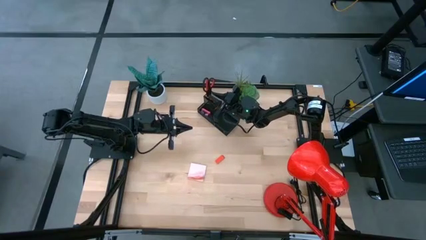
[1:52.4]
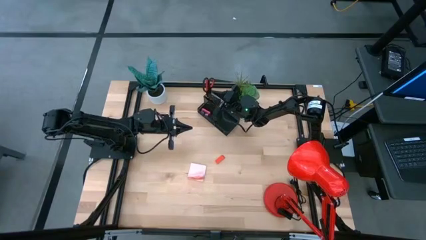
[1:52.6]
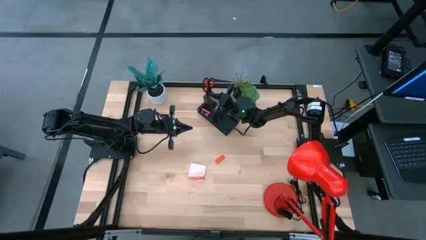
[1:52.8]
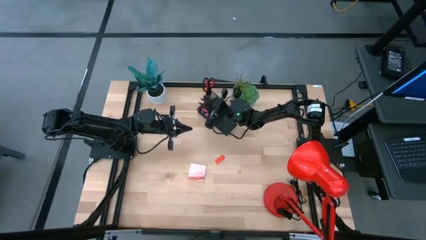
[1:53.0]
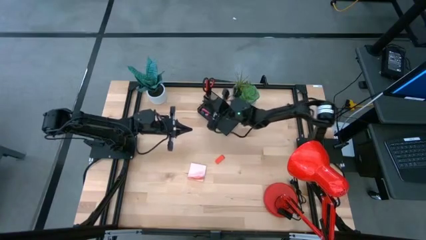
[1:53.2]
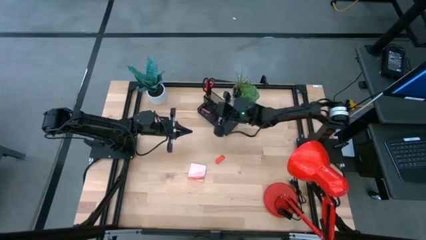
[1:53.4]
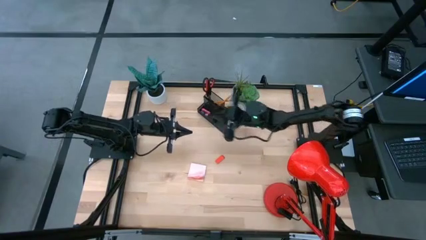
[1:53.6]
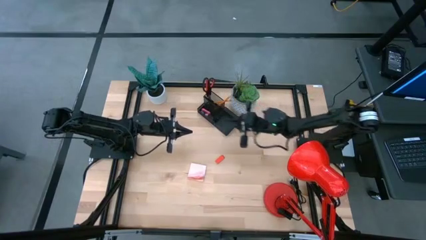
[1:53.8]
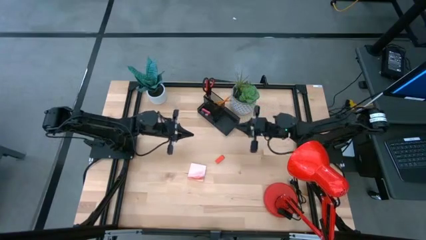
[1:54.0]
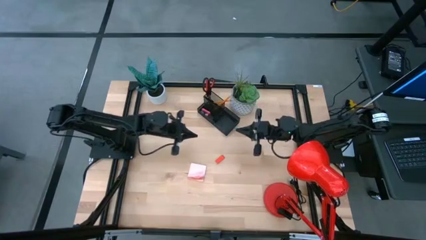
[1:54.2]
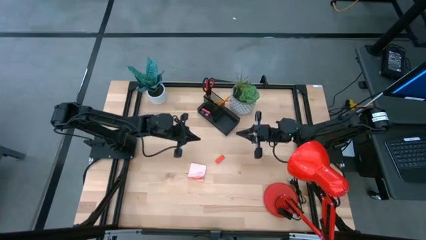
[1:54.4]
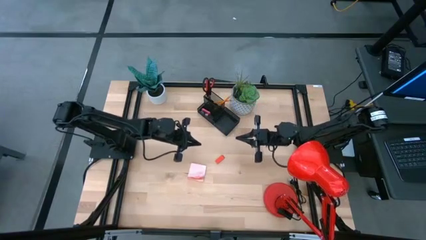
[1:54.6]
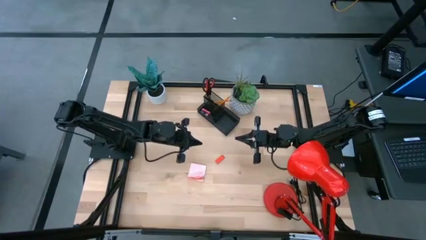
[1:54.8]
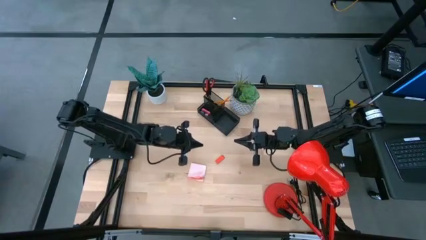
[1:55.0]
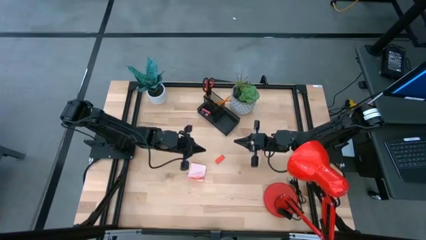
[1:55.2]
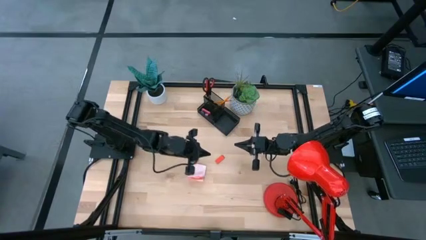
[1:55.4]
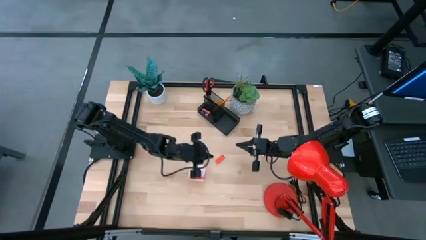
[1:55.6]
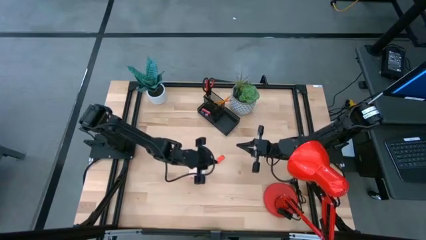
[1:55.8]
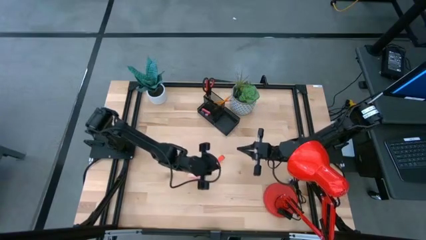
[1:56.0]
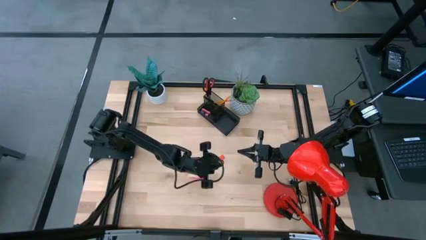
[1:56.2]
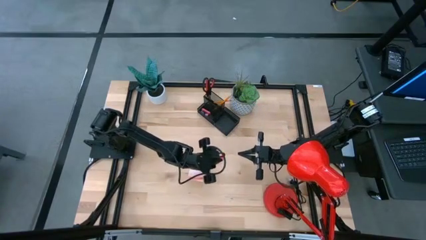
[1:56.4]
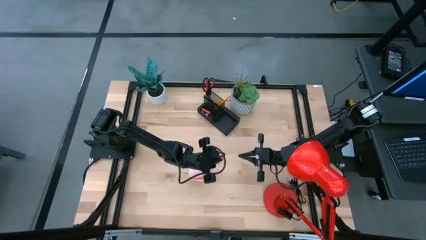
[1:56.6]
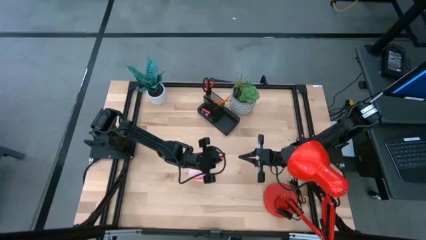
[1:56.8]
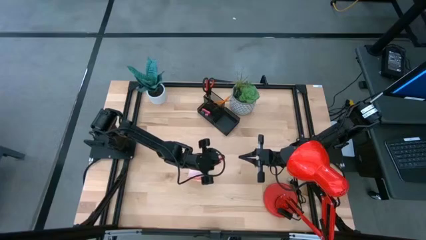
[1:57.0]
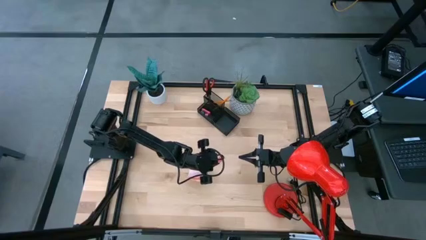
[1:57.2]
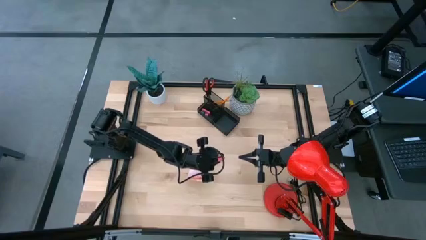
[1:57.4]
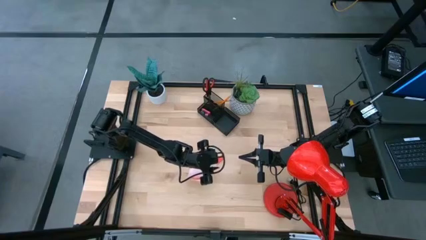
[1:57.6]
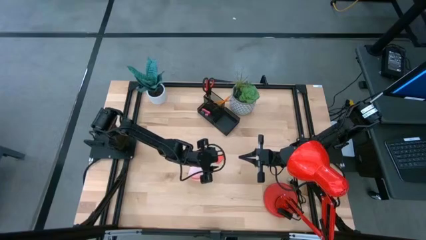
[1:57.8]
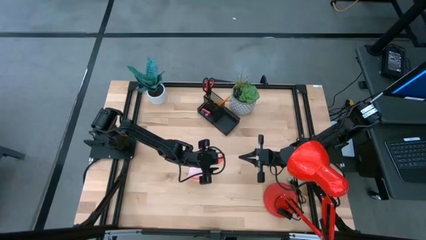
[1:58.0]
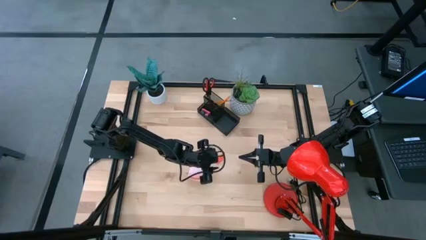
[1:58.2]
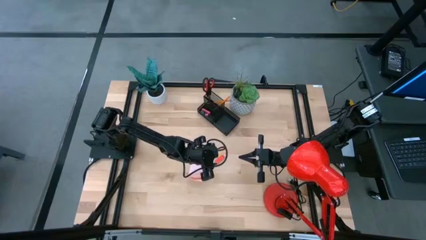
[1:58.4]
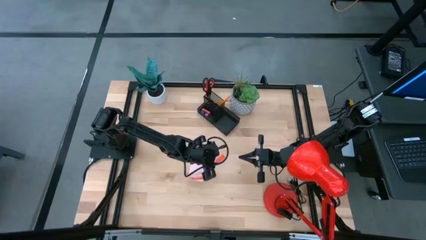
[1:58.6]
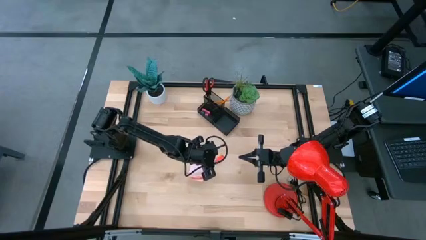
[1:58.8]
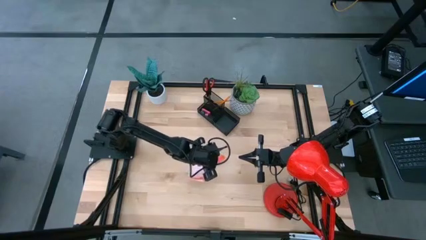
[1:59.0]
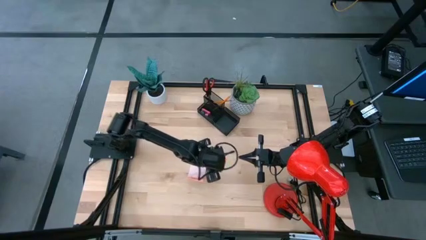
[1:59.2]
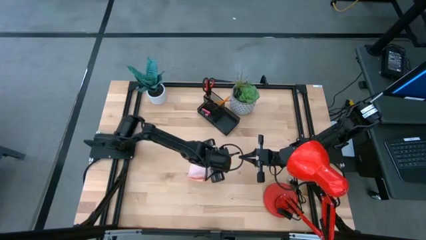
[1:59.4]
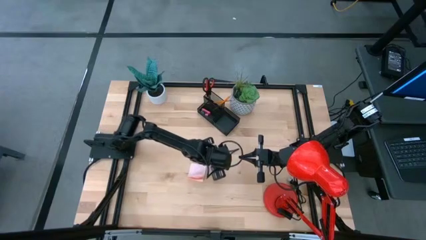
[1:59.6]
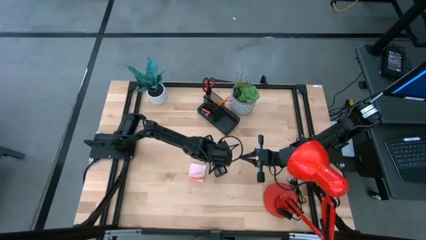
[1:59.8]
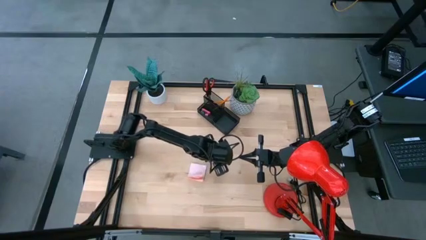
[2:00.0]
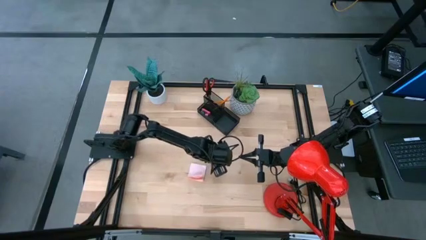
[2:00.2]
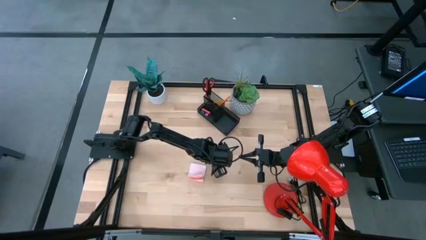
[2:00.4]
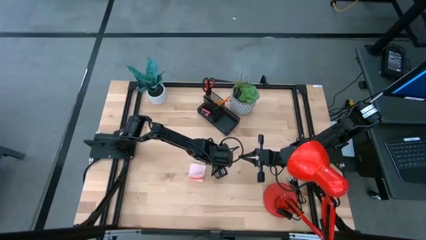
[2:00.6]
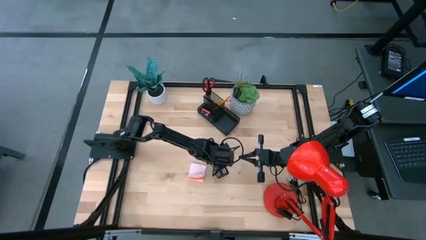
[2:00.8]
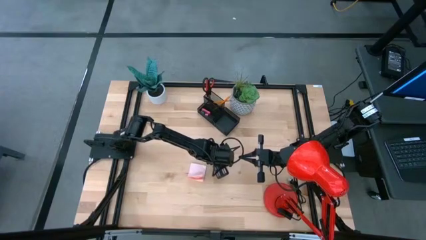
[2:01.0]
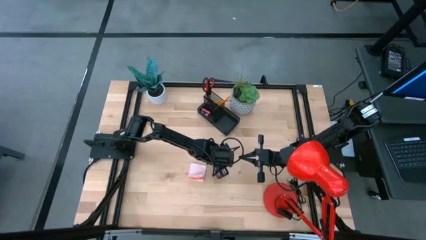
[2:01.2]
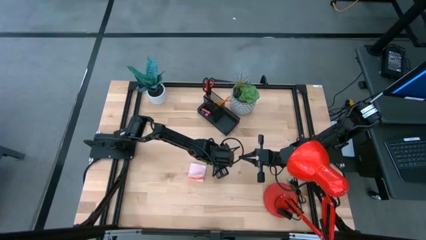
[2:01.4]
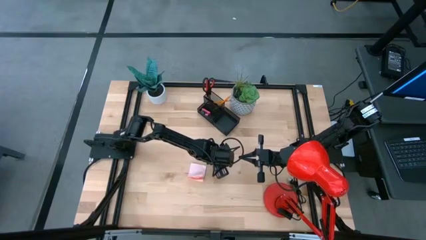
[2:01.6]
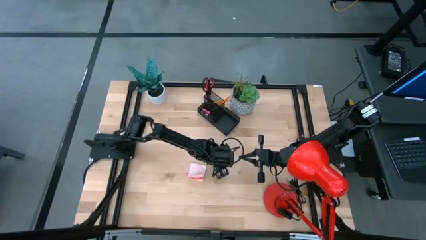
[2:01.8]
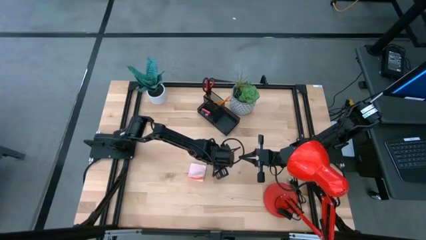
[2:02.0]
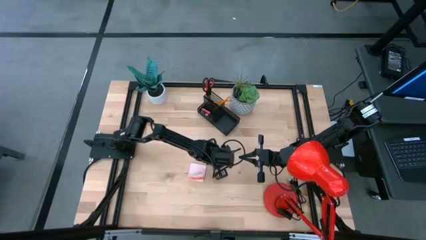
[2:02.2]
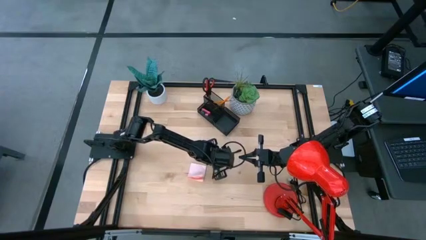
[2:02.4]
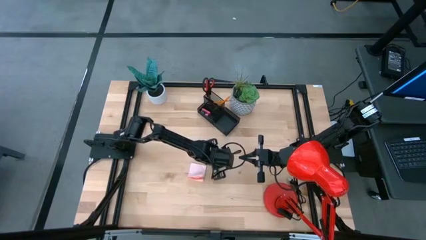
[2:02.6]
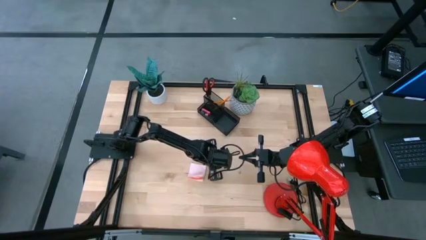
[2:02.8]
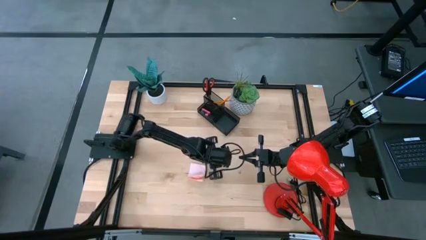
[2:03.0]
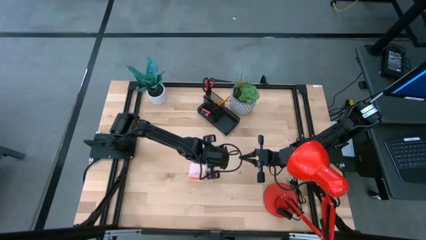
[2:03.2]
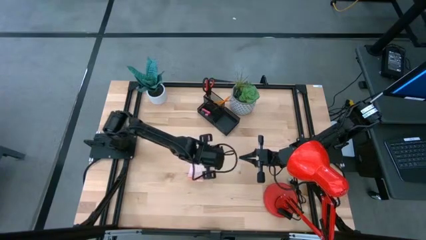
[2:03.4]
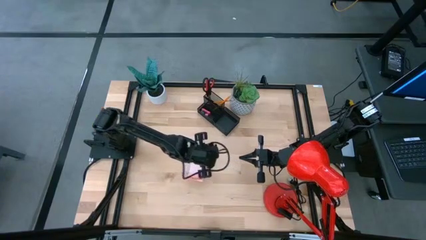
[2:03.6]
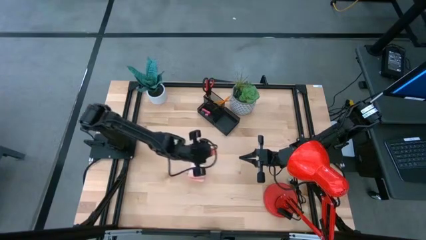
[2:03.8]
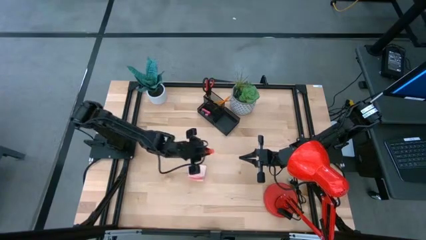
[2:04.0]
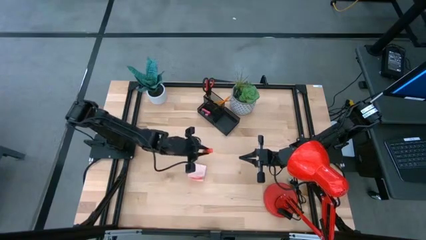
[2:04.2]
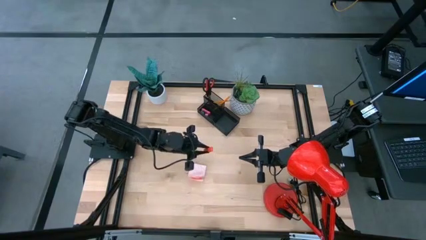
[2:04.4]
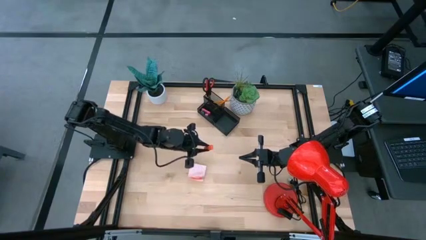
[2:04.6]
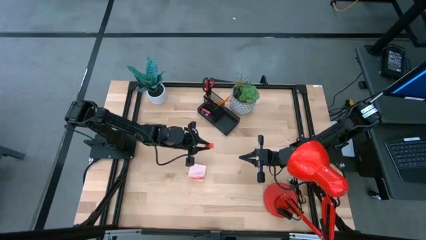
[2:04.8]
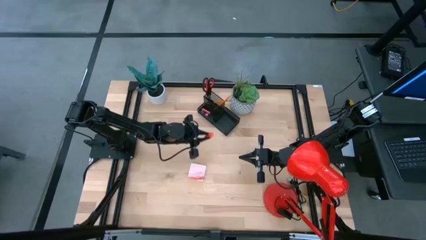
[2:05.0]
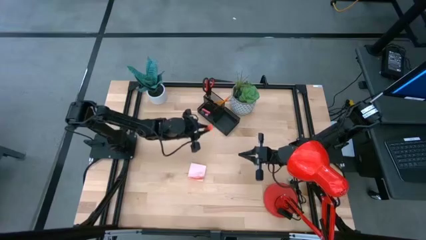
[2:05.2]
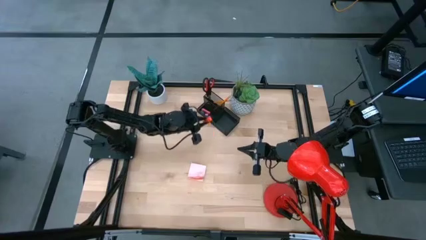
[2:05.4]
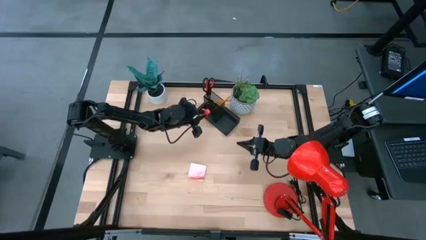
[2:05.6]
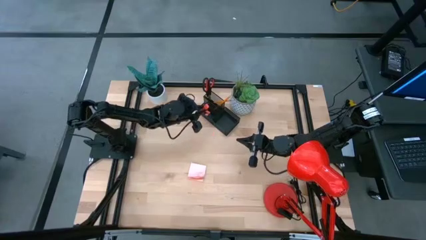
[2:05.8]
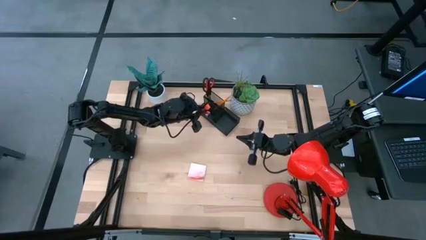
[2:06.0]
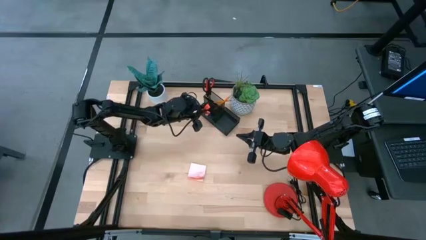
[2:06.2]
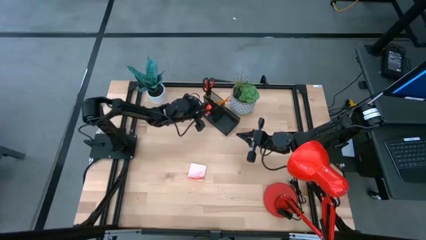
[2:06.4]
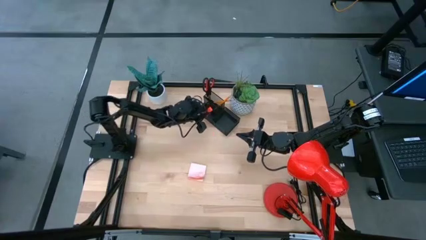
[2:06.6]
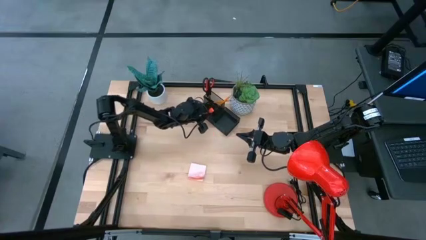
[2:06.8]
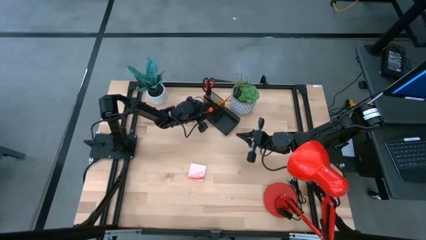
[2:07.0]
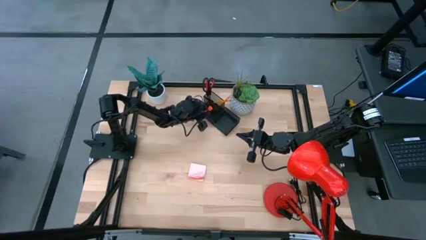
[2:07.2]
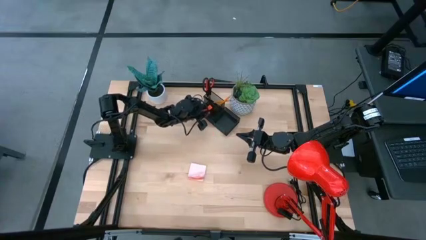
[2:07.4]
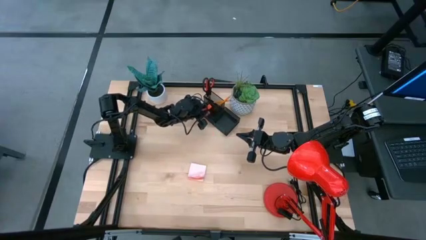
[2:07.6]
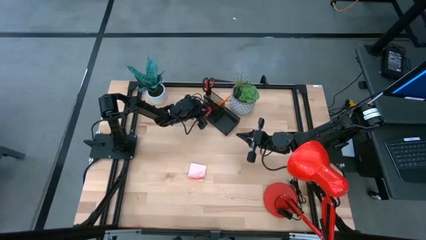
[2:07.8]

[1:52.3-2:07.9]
Task: Pick and place office supplies into organizer
Put the orange eraser into the black desk organizer
